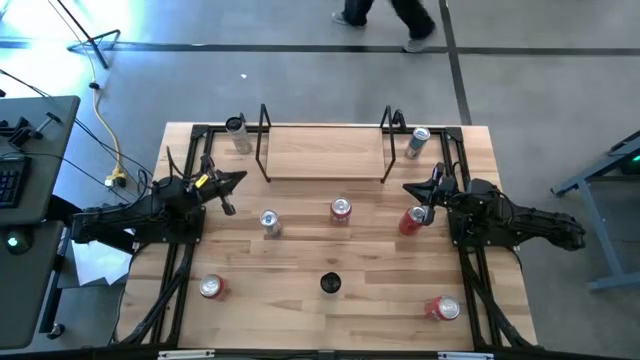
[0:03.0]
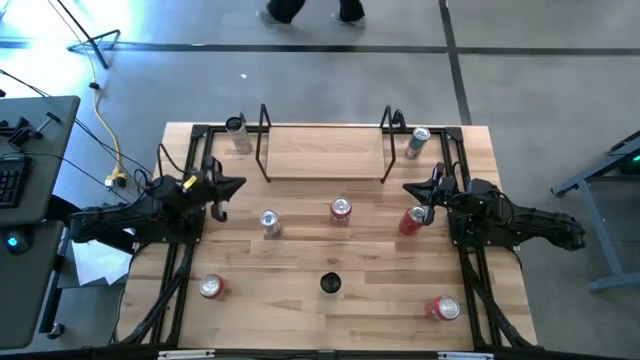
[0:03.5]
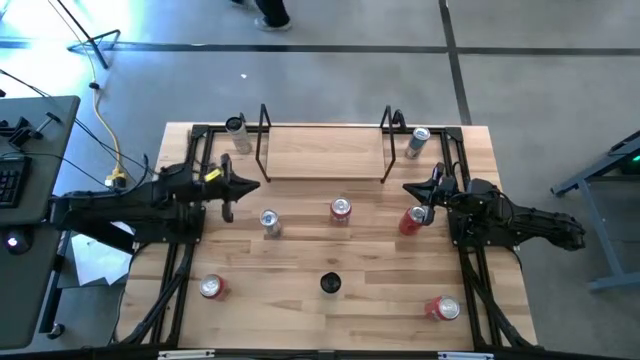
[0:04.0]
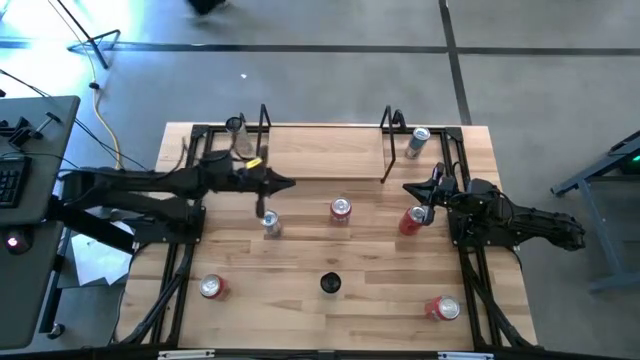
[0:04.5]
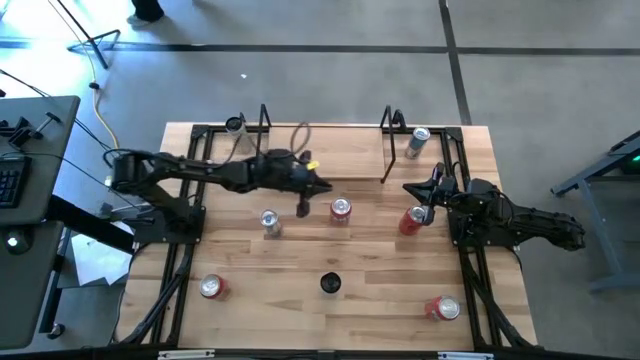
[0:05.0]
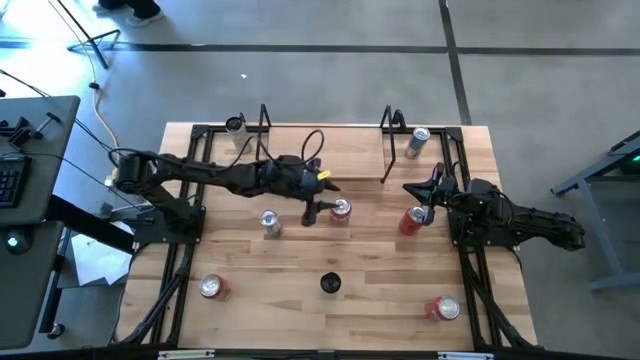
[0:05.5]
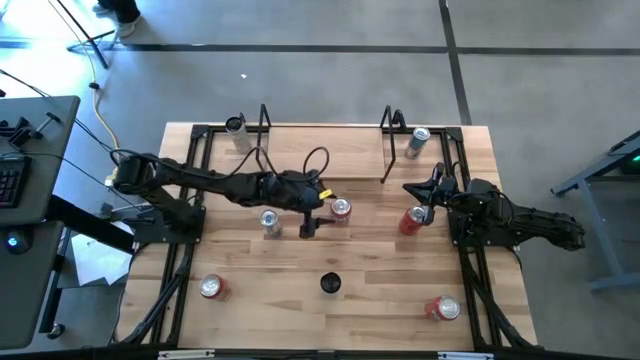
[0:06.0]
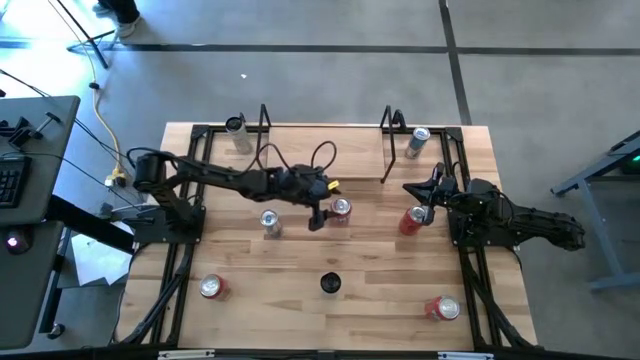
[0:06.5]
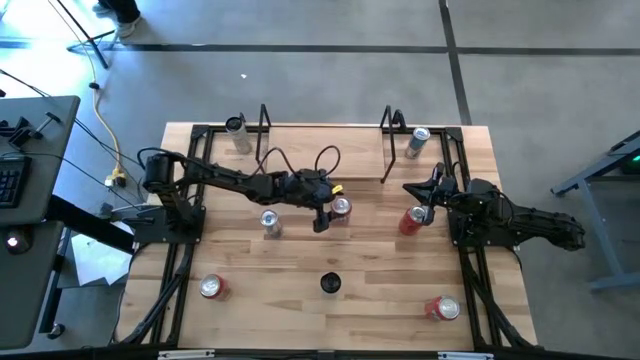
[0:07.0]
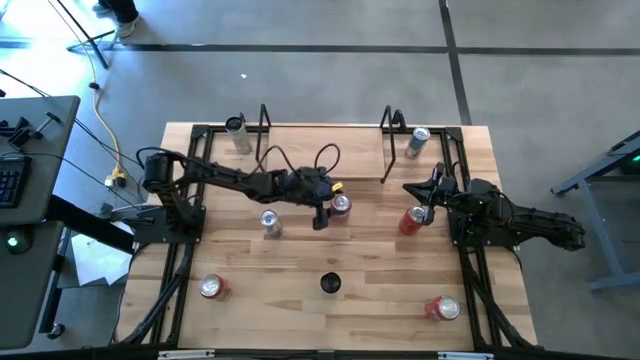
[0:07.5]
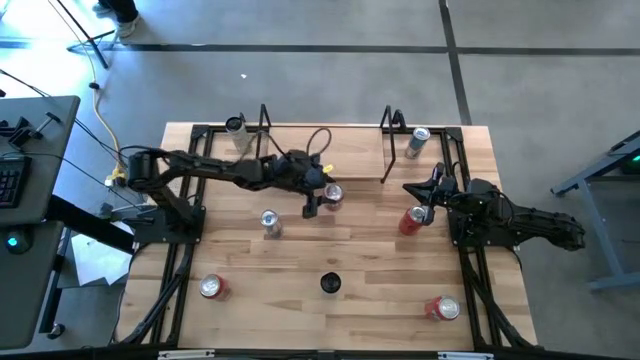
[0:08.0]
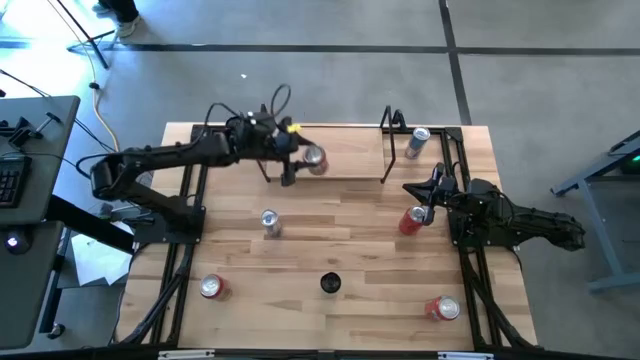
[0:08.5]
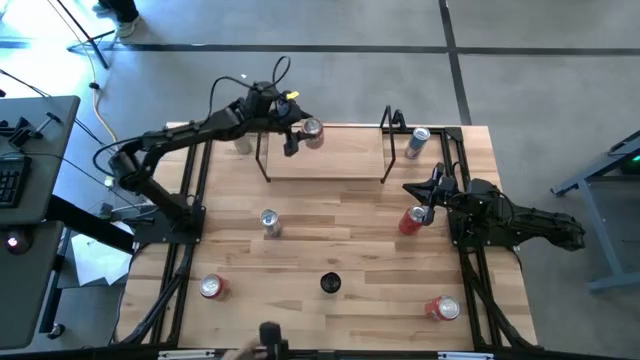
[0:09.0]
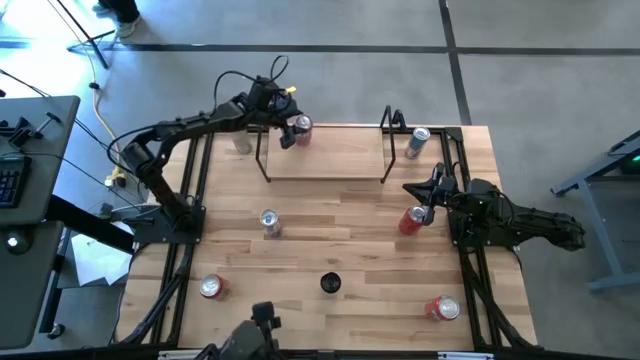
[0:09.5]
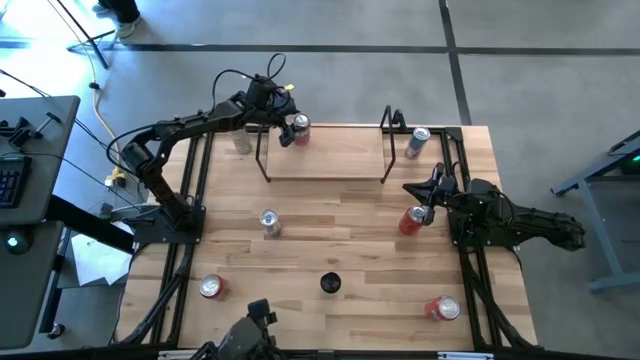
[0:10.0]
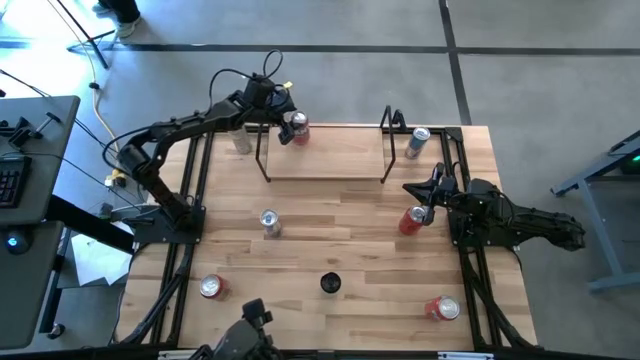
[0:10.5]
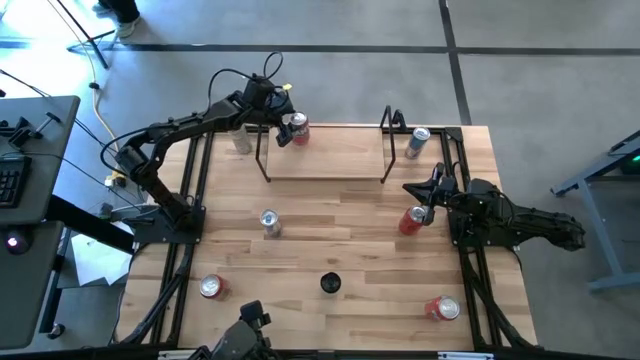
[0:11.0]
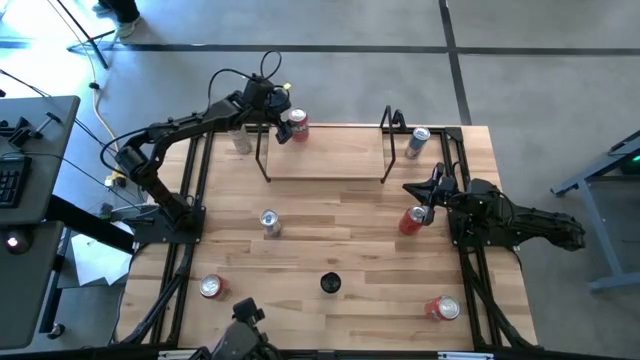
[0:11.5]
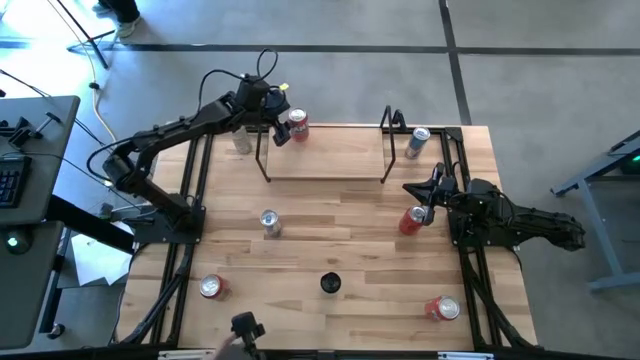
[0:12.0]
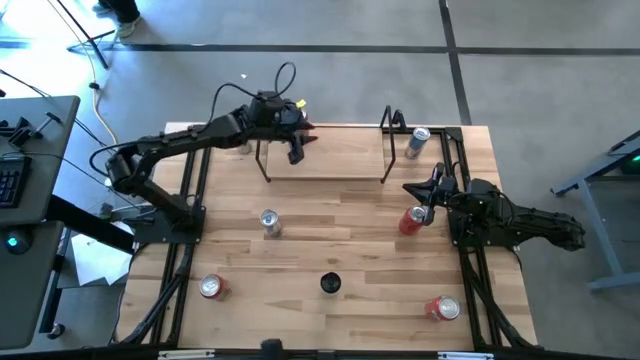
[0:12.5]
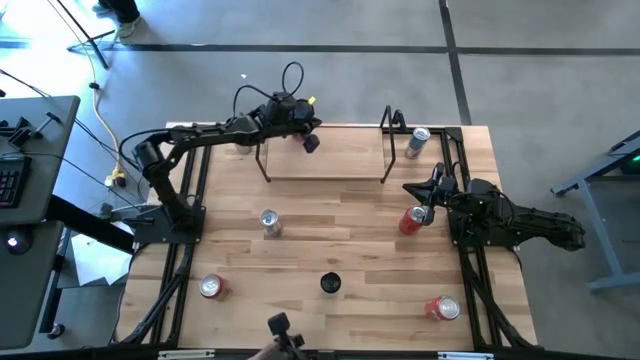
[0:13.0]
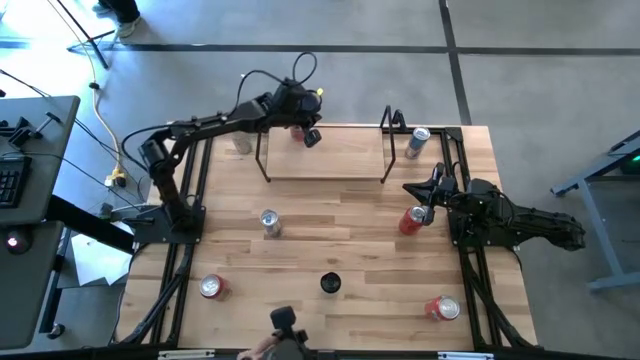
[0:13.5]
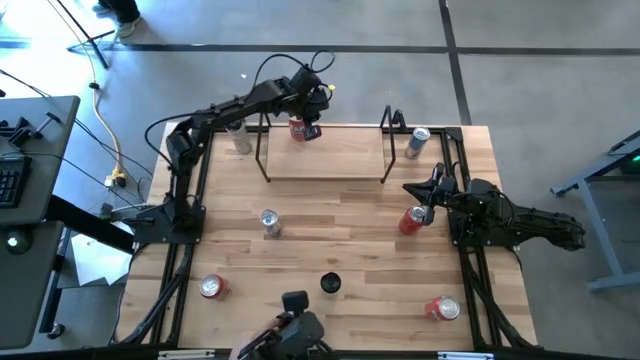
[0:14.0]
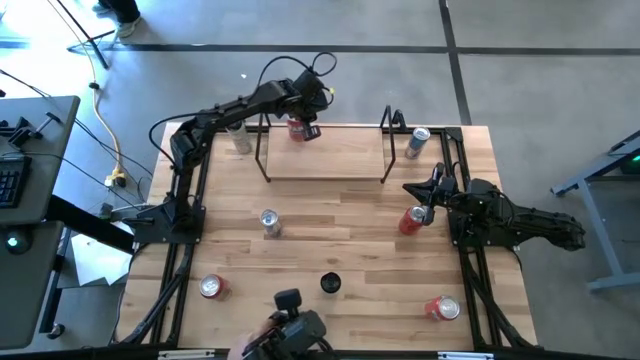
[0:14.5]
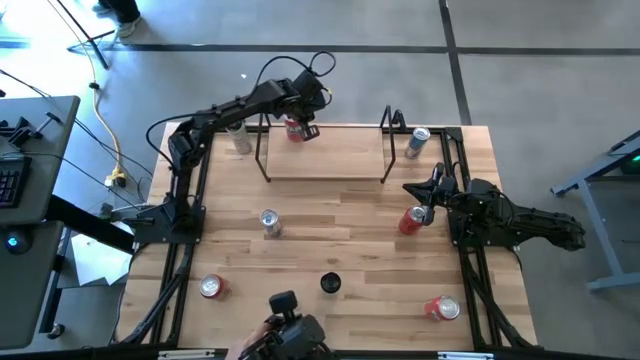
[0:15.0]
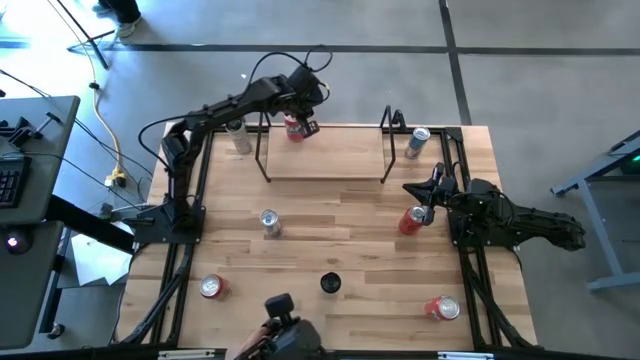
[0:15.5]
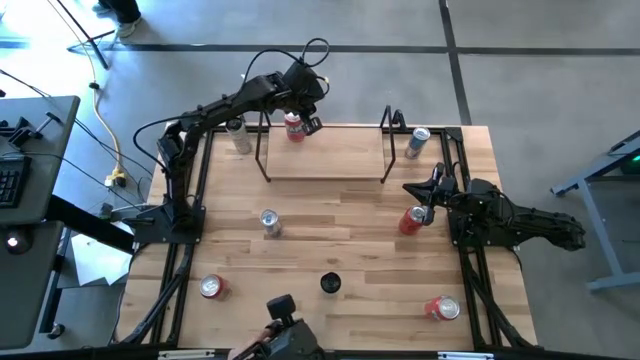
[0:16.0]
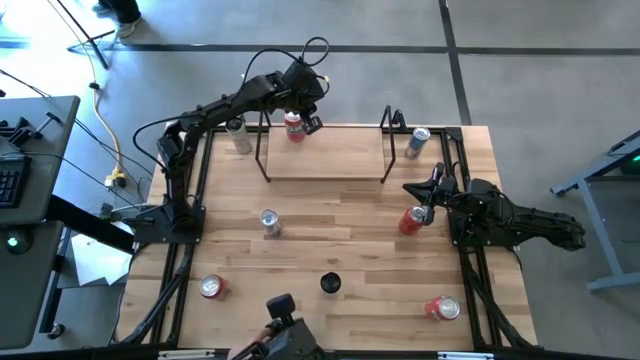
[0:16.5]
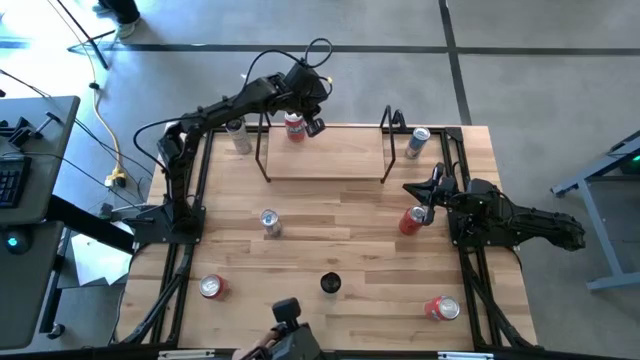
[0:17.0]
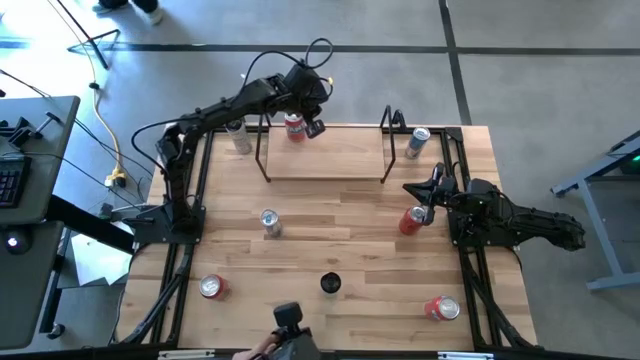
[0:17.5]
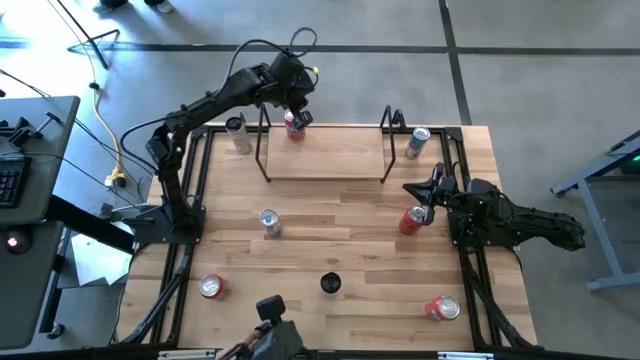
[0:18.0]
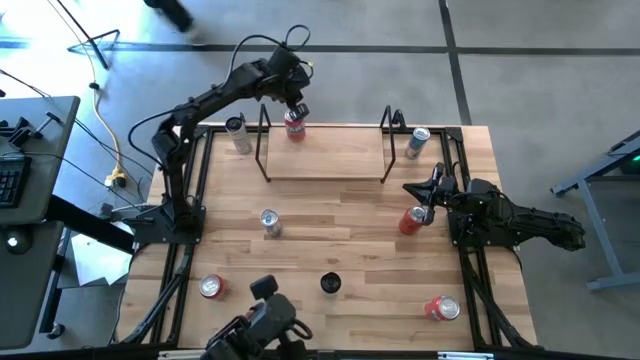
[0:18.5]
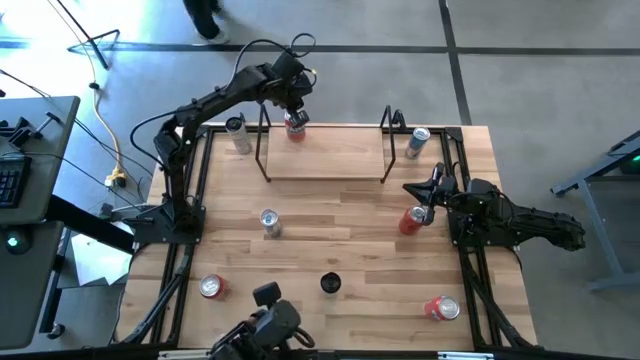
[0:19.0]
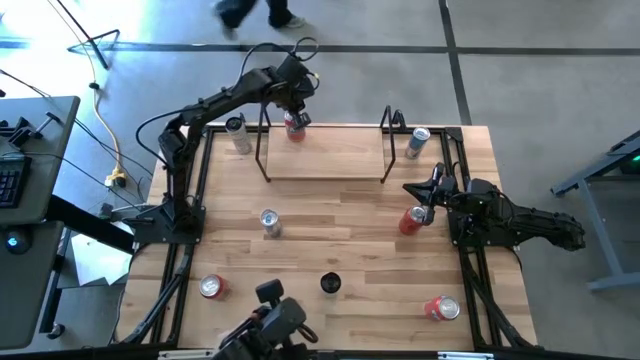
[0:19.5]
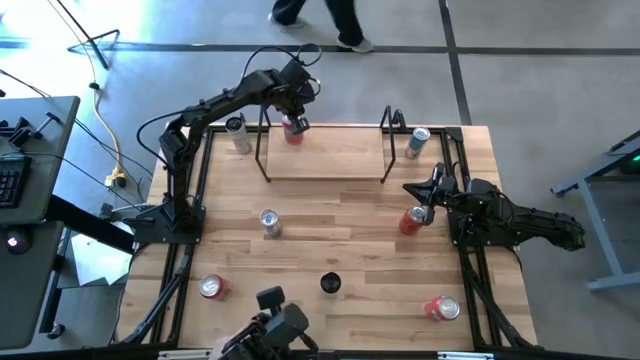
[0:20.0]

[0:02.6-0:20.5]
Task: Place canned beverage on shelf
Put the top red soda can on the shelf
